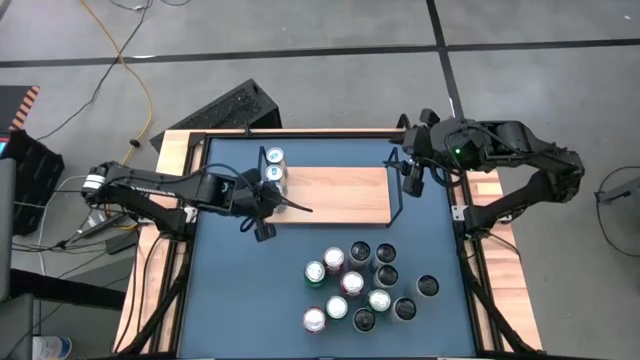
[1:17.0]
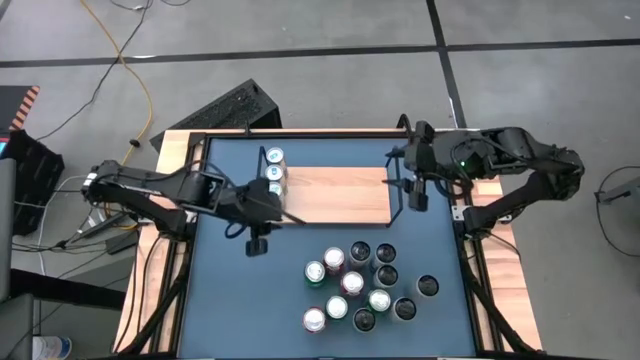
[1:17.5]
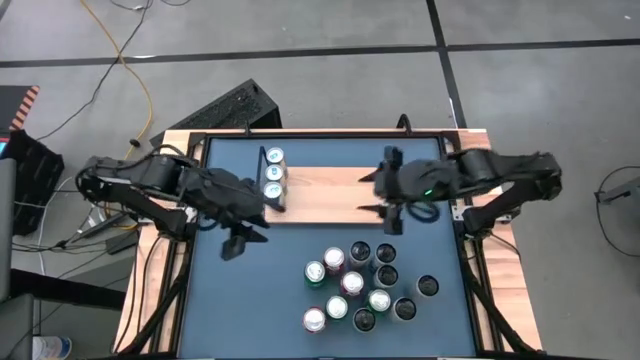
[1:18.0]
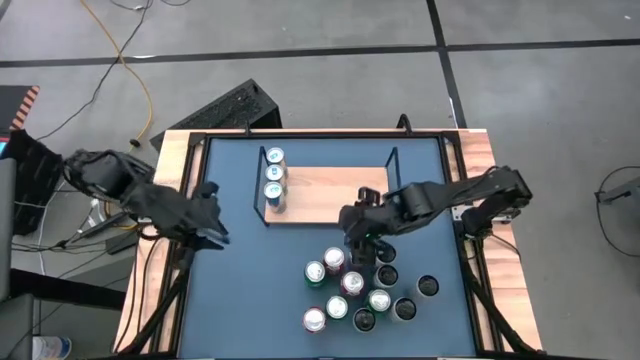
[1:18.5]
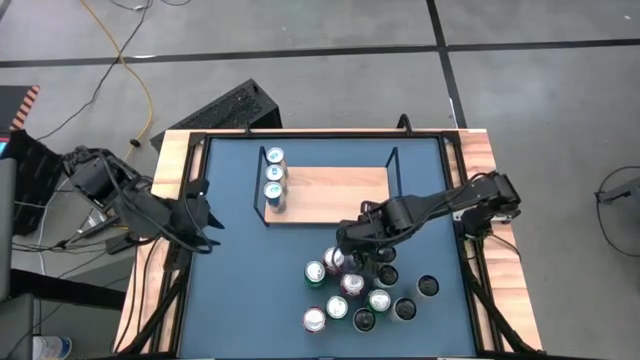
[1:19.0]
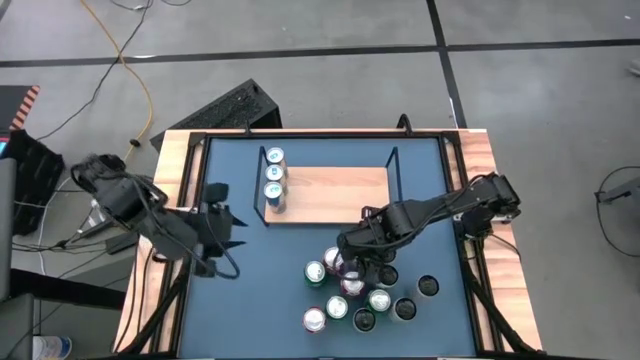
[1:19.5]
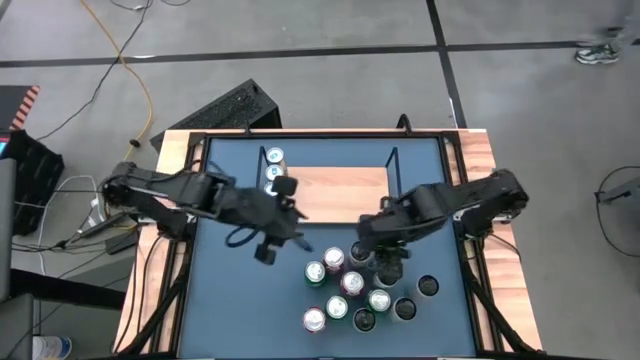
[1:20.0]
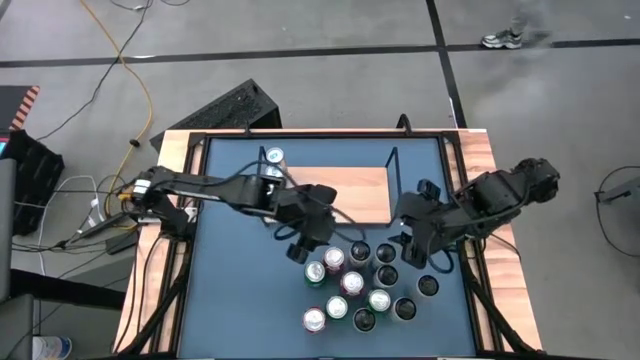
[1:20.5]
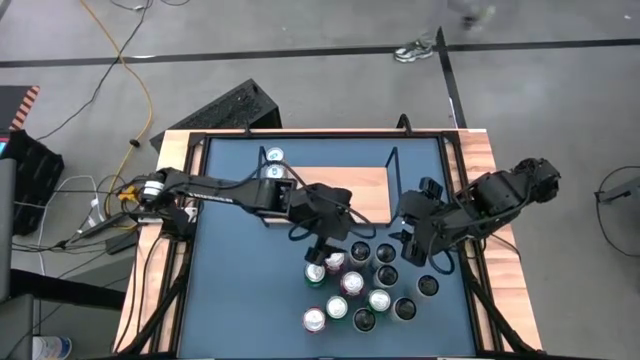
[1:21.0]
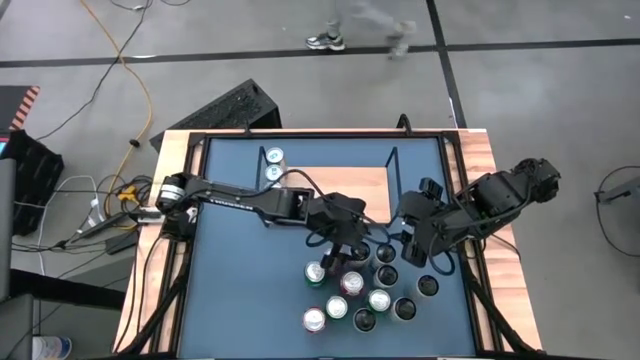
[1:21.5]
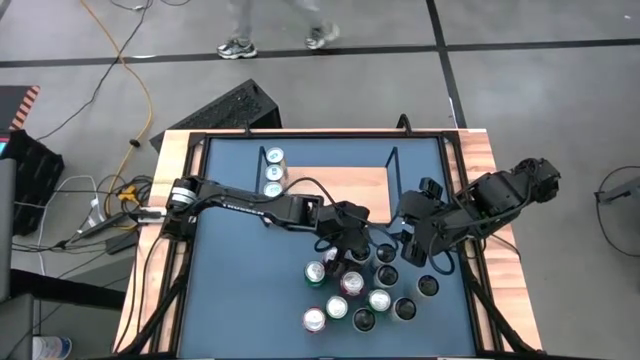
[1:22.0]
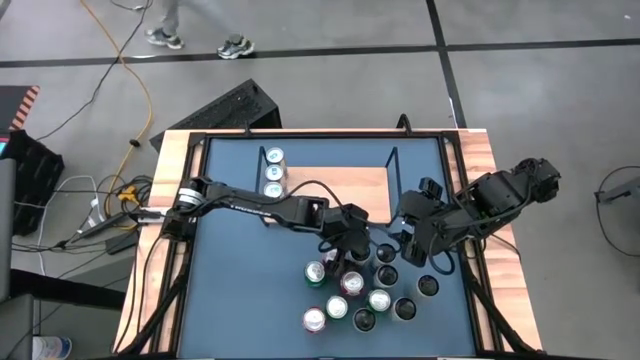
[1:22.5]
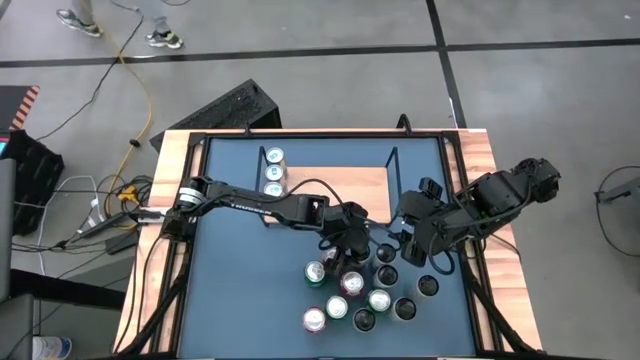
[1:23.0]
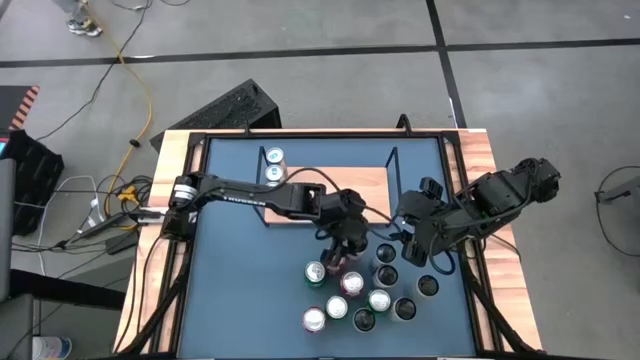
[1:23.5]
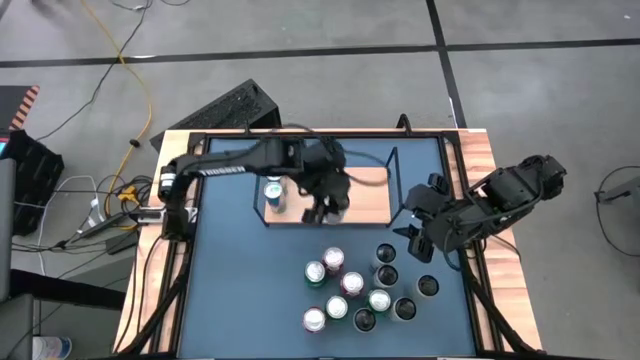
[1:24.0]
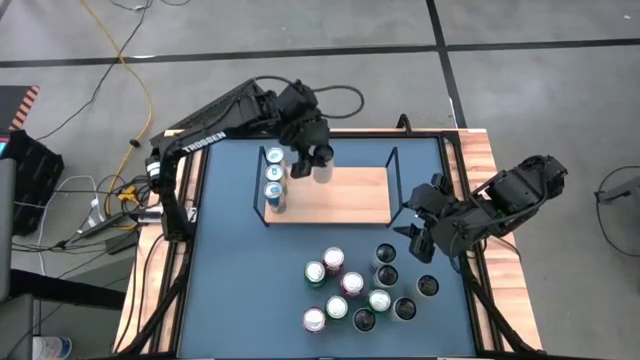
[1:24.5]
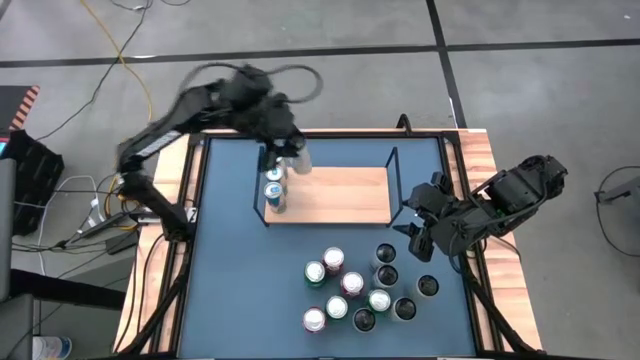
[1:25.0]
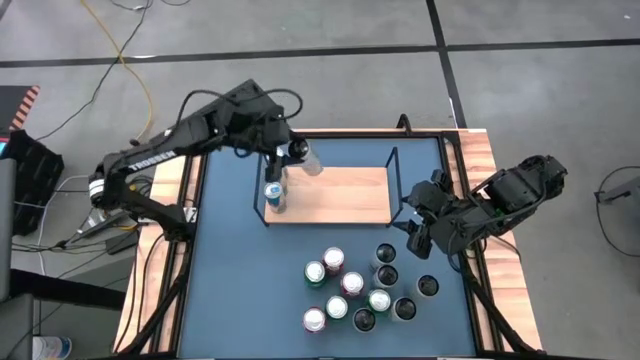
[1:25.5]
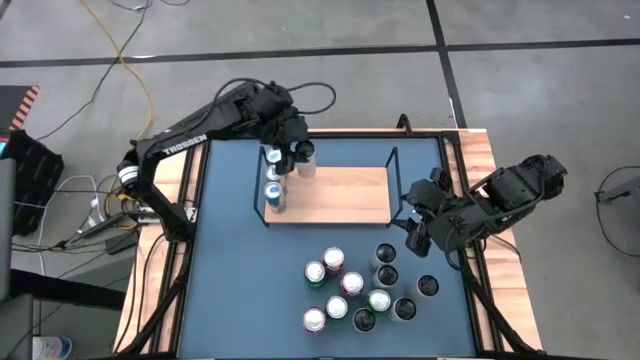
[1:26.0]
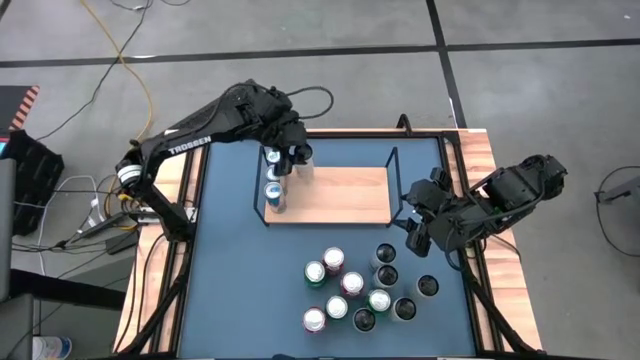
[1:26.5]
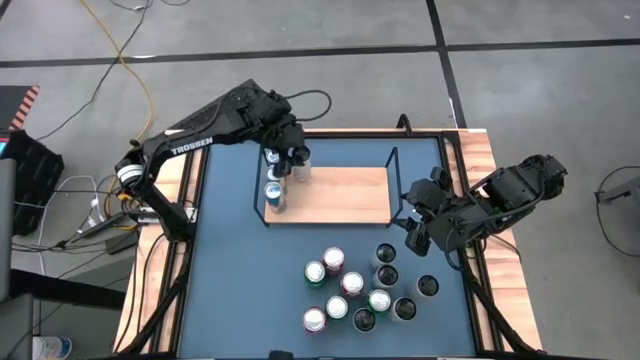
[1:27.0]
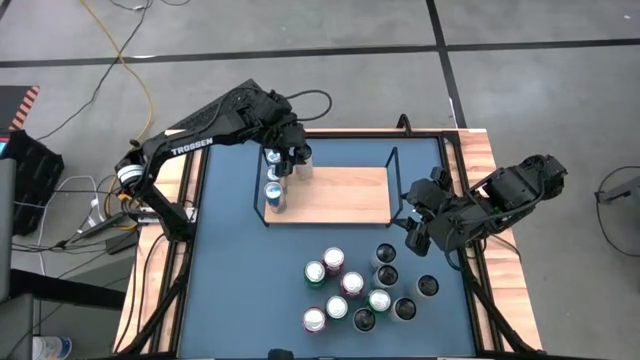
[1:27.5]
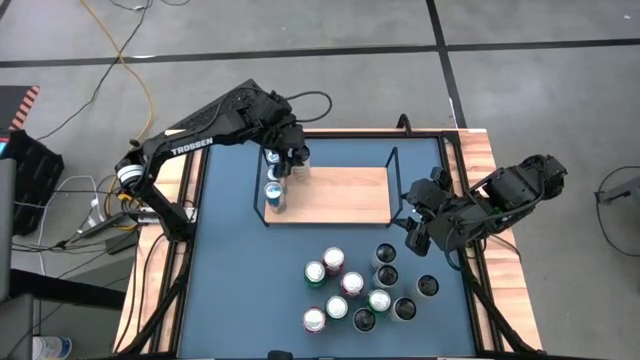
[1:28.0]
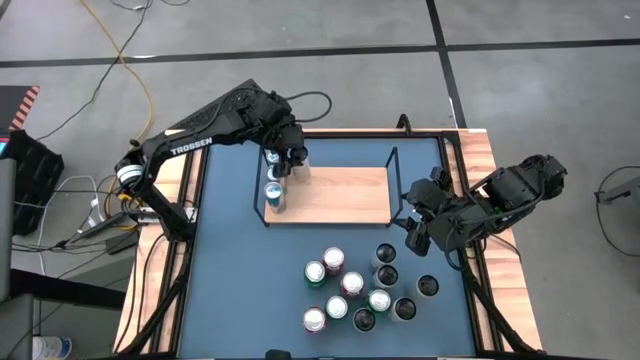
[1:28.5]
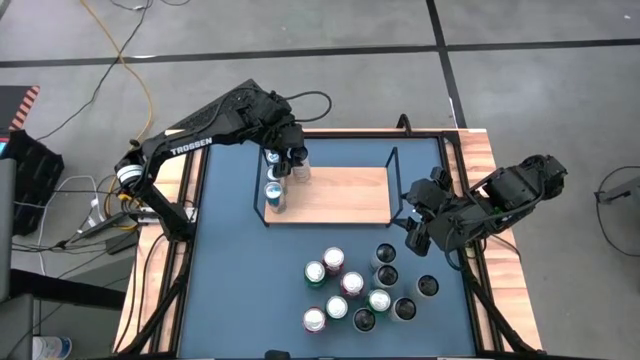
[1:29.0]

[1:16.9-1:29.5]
Task: Place canned beverage on shelf
Put the top white and orange soda can on the shelf
